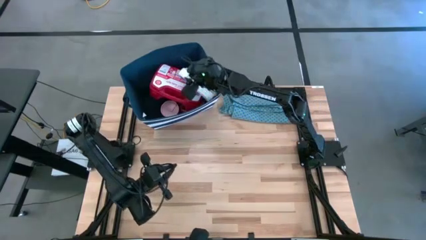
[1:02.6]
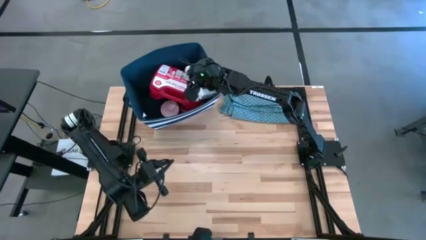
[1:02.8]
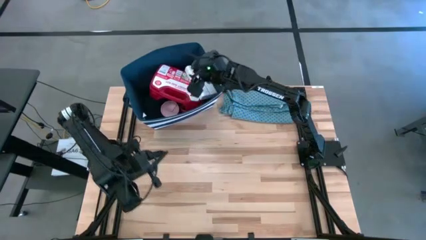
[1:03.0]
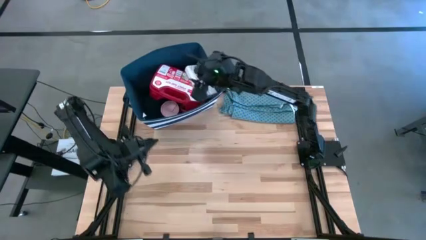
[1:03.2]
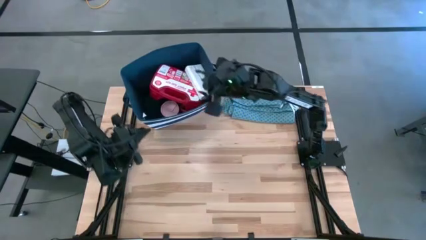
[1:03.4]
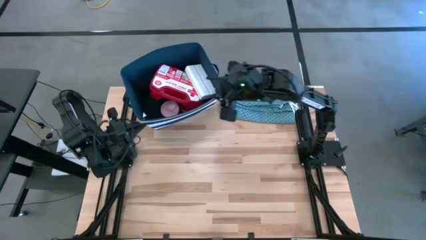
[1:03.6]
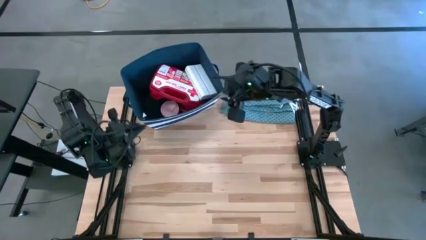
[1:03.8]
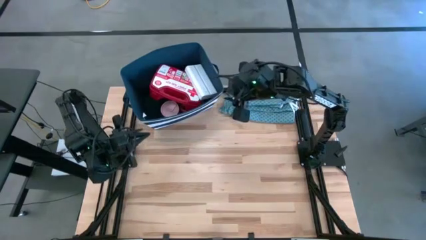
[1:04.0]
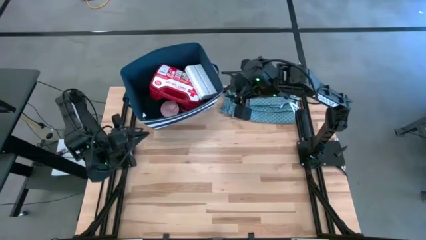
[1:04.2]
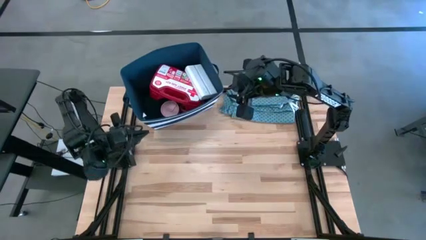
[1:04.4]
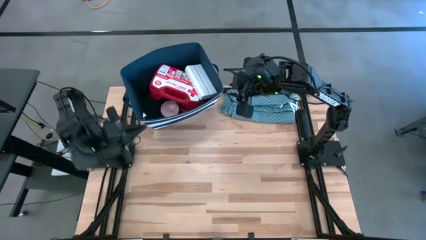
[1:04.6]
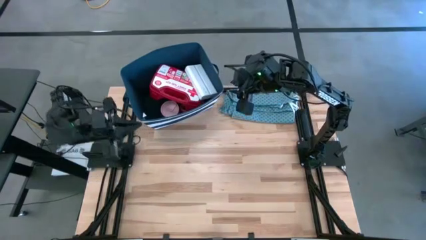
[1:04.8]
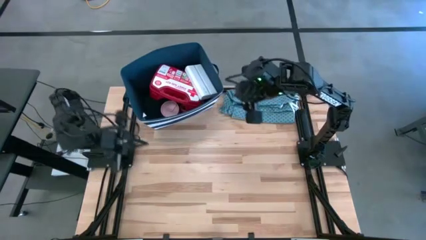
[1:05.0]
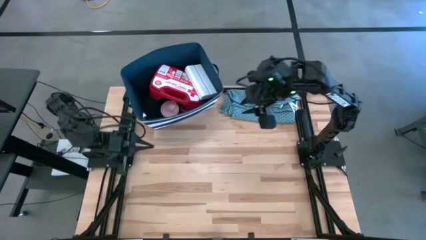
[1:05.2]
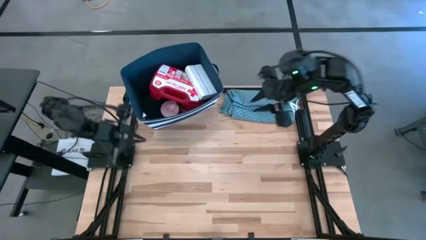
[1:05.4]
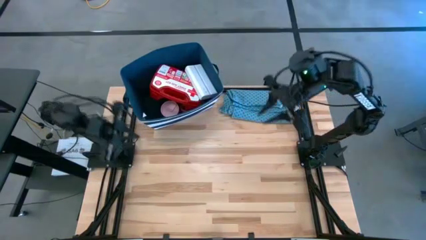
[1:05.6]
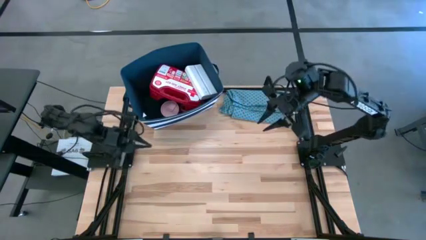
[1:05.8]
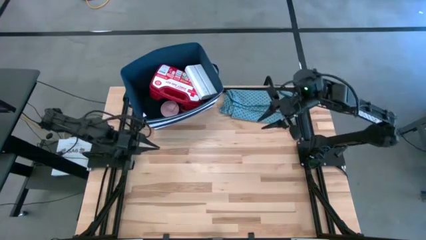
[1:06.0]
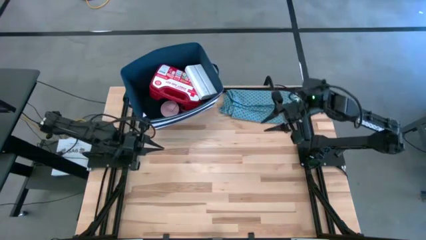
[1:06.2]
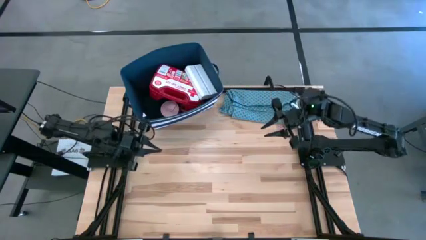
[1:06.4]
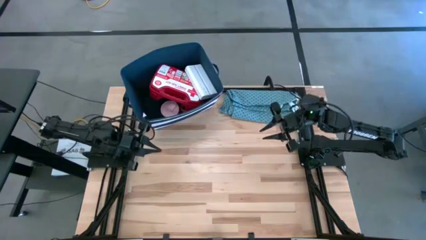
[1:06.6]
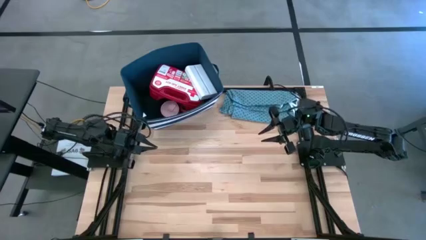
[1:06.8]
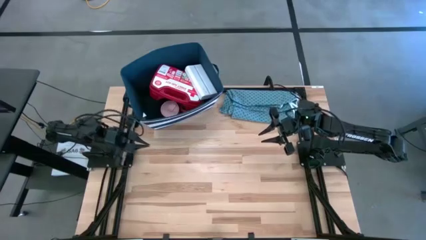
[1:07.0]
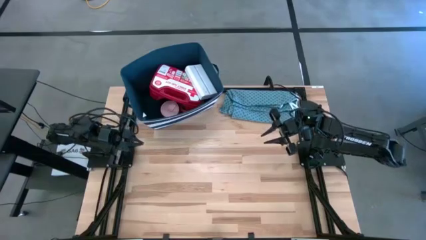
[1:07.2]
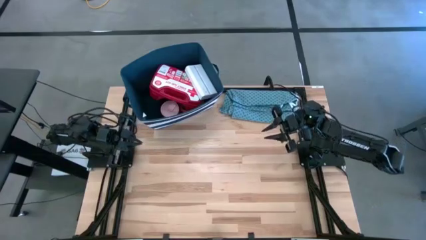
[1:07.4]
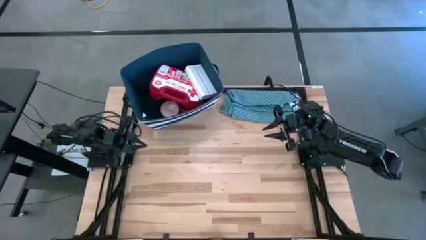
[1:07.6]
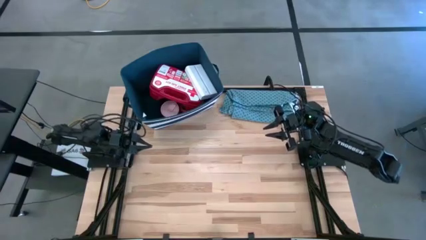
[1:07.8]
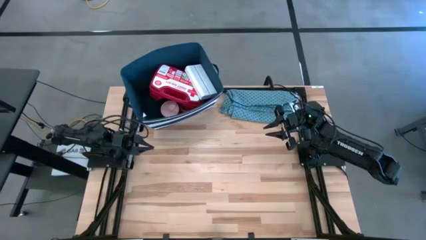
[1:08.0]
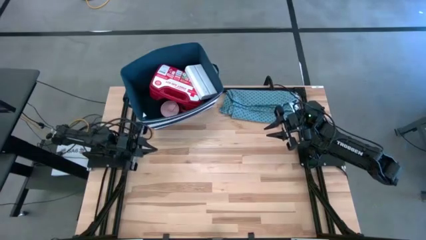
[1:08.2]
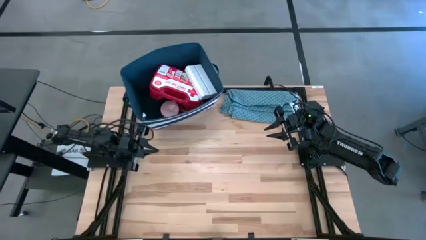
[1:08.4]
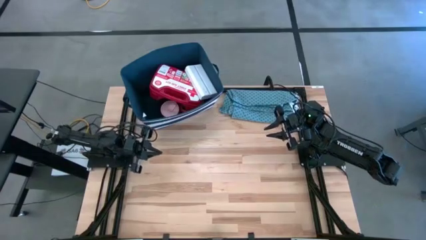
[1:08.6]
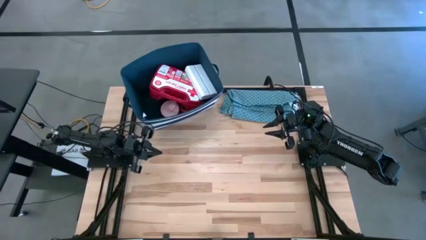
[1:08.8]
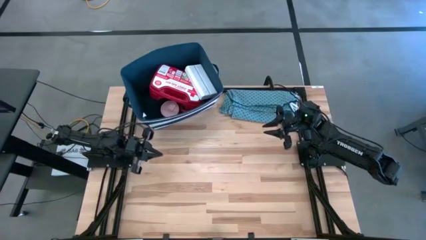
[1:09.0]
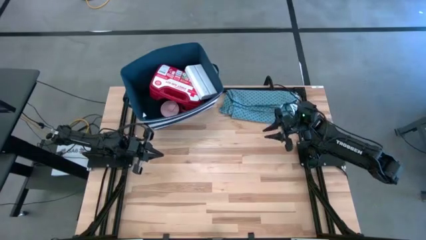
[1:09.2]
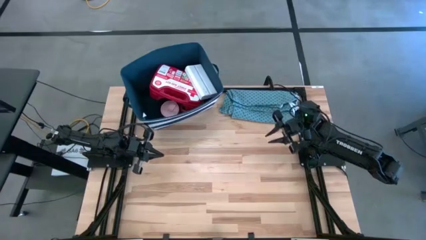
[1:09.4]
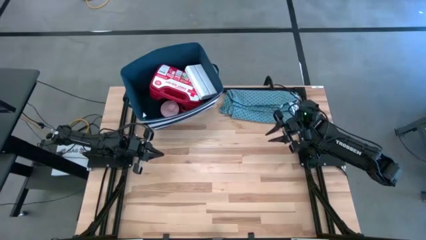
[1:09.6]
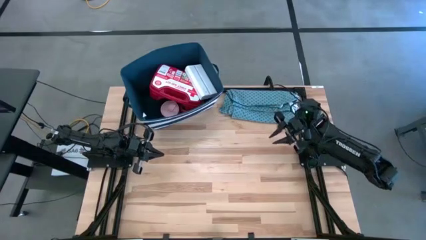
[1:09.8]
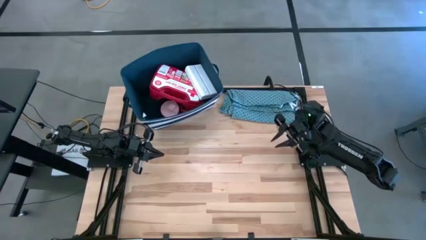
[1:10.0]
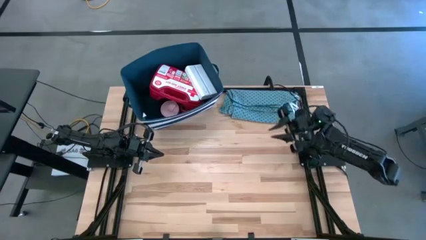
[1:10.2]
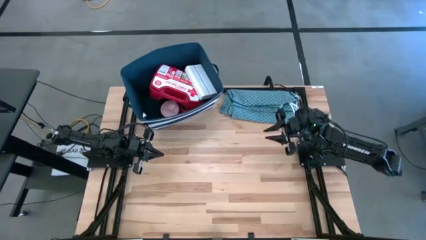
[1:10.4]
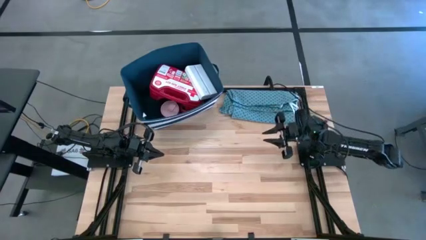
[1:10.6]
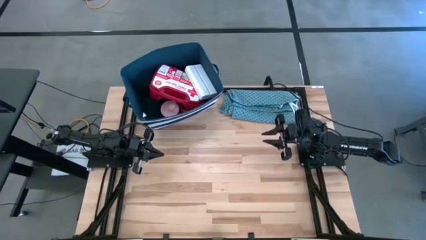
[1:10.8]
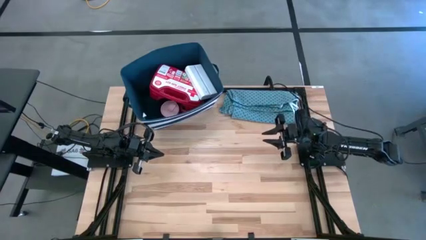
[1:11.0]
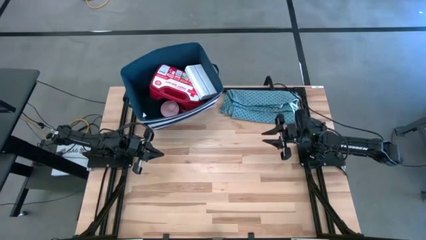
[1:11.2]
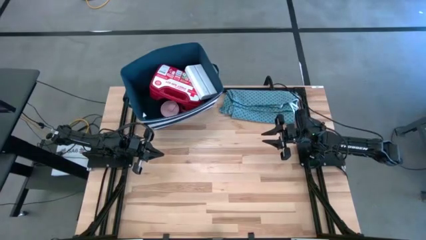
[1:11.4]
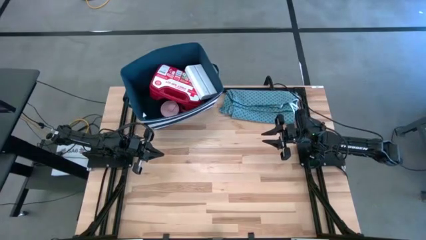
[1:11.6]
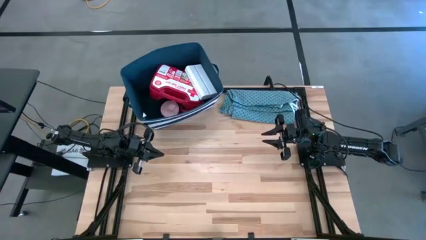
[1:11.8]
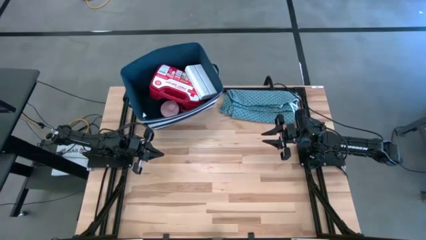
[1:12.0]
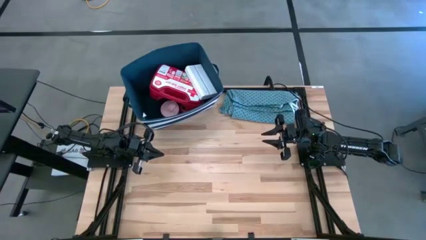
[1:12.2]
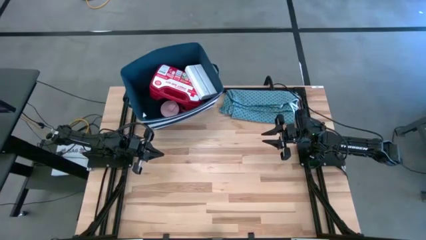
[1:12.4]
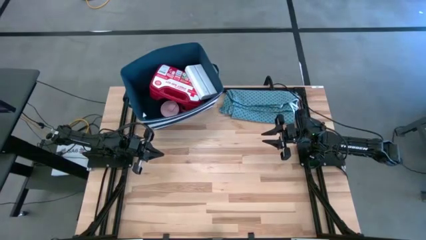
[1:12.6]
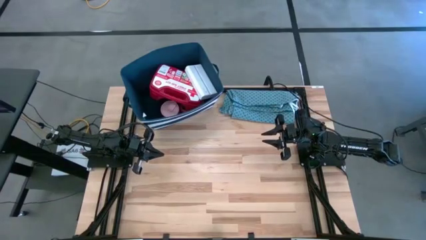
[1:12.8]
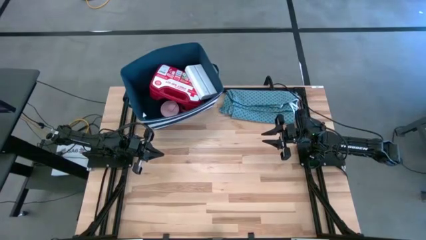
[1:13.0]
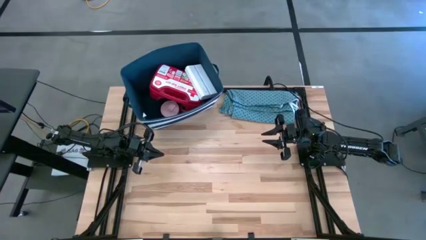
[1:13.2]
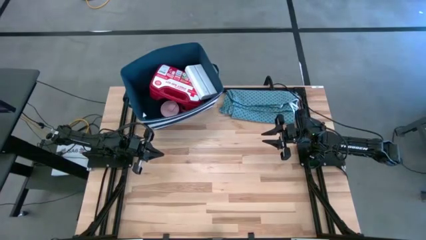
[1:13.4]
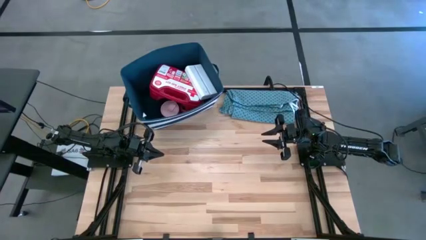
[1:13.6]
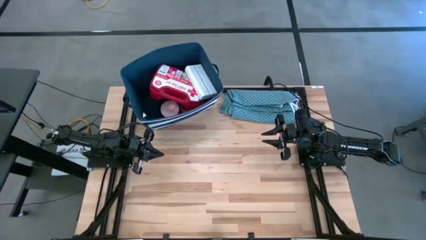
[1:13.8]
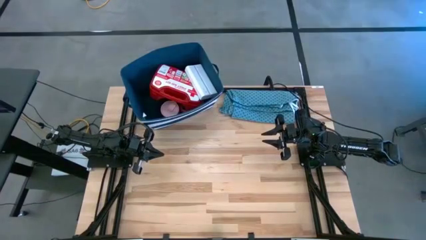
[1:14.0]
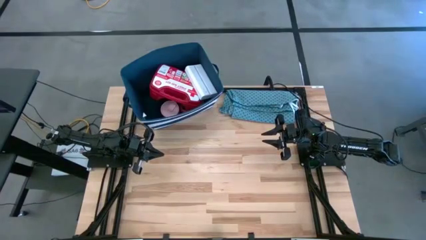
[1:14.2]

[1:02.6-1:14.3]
Task: Pick & place medical supplies in basket/bin
Return to Home Position

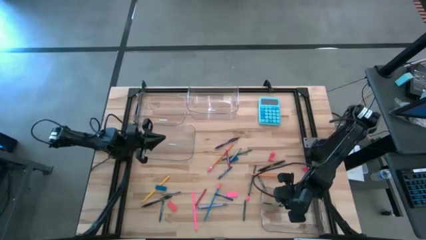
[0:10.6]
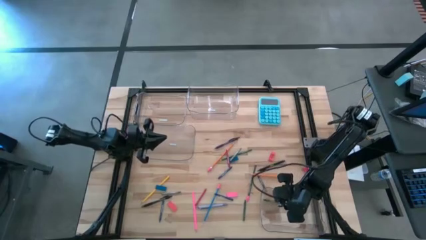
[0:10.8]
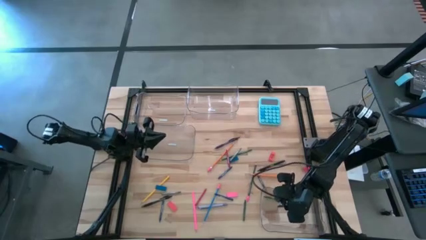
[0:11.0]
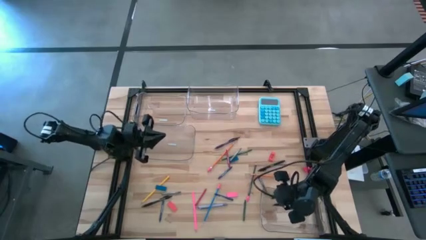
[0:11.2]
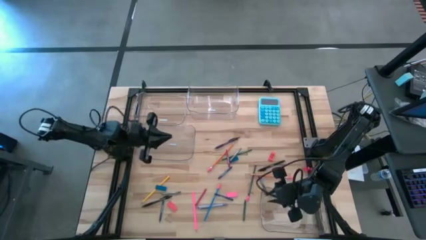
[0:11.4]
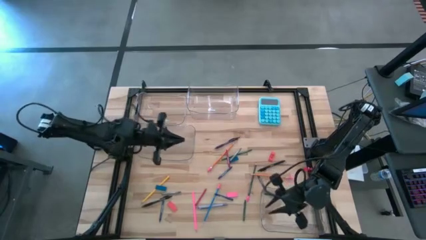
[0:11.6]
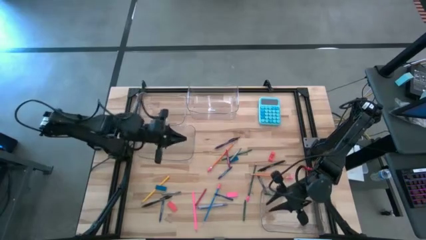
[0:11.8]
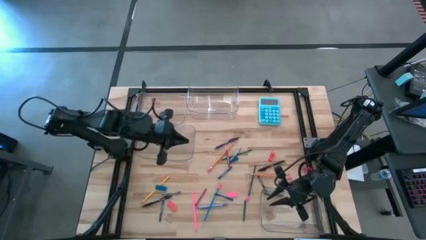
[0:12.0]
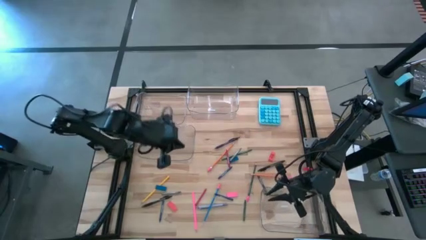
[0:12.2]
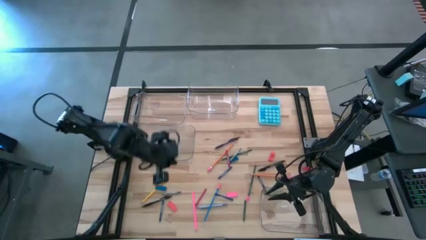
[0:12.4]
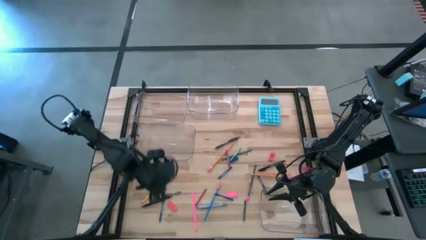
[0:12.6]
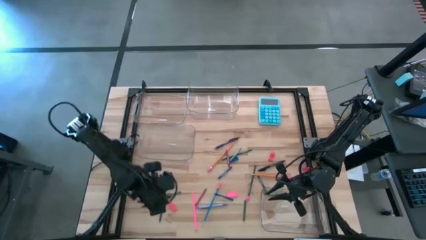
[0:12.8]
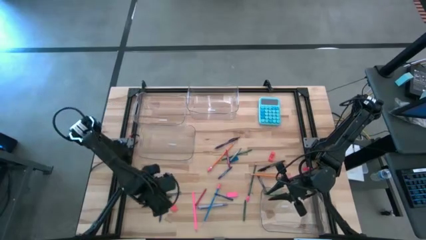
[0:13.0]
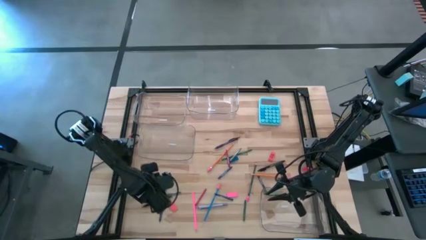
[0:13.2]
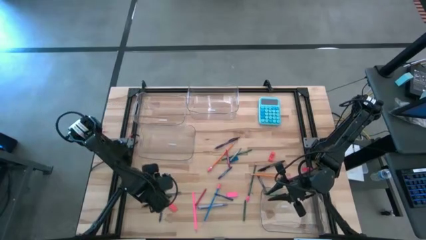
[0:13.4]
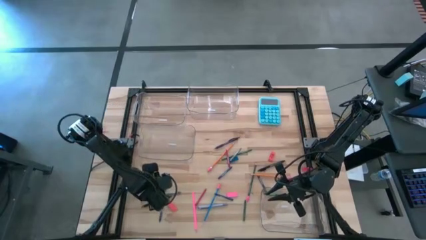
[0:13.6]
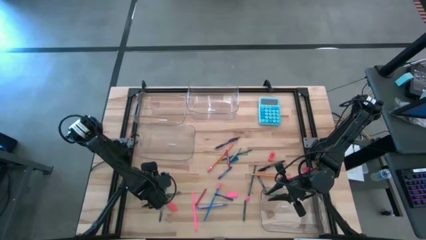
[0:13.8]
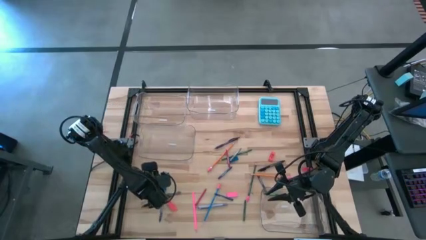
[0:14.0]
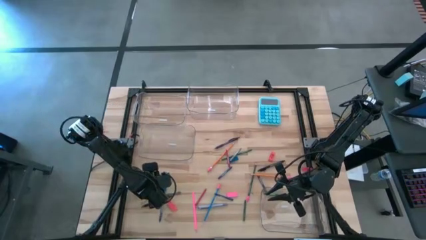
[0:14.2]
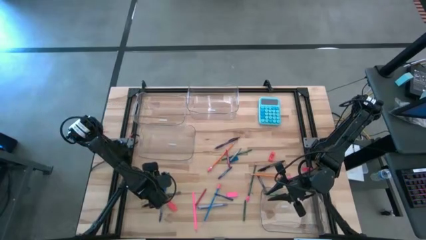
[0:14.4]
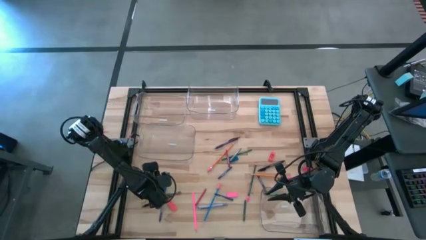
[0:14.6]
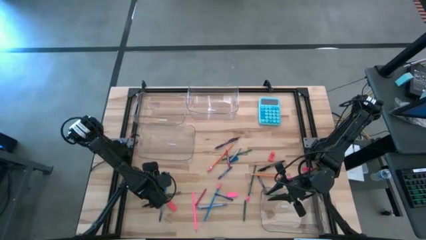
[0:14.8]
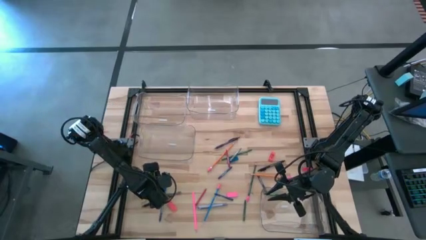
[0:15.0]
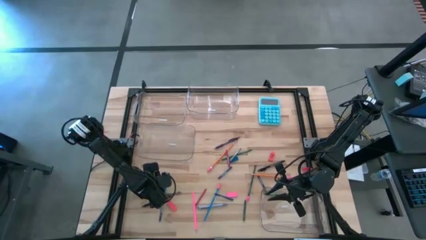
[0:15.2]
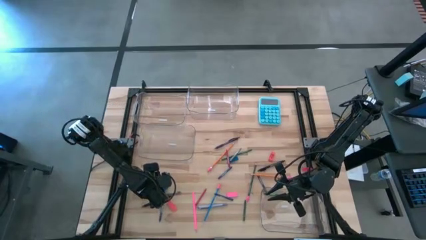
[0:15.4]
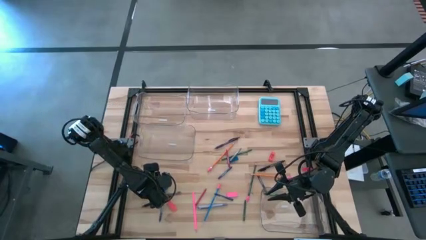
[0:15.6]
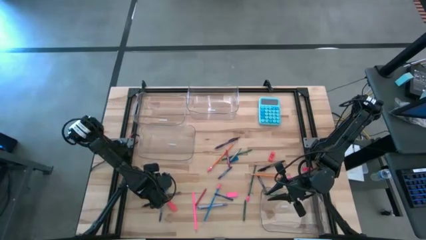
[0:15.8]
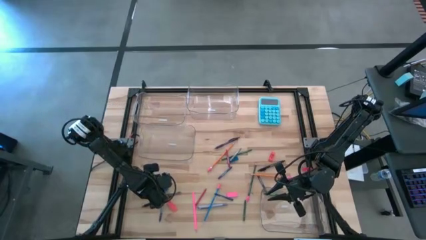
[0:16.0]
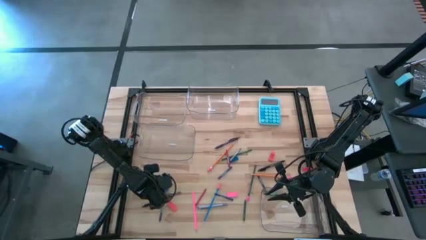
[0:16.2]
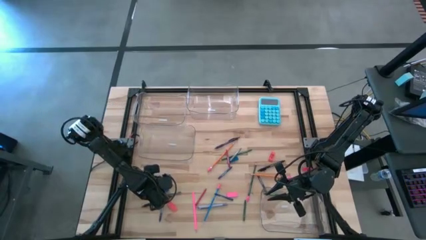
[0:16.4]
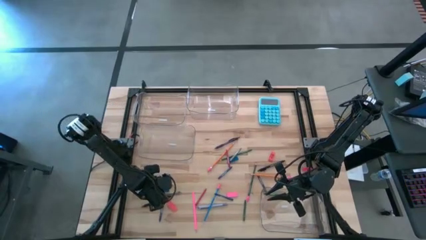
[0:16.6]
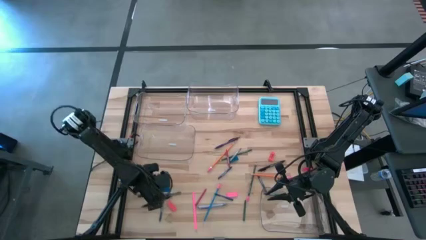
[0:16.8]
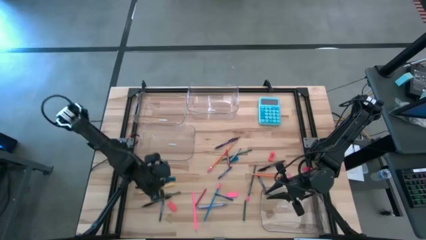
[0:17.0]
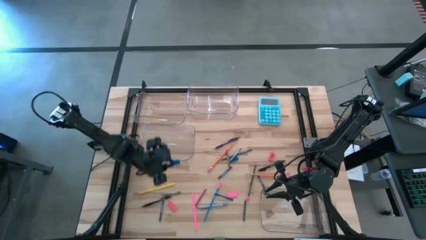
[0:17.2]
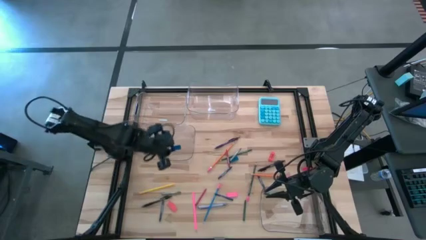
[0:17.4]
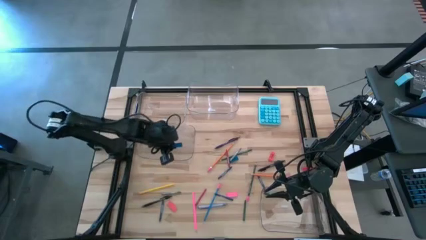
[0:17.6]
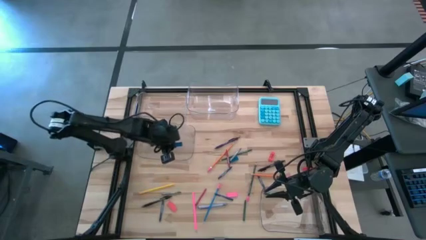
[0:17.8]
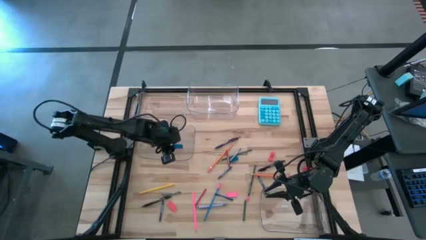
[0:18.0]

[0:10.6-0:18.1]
Task: Sort crayons/erasers/pens/pencils in bins
Put the bottom blue eraser into the middle left transparent bin
